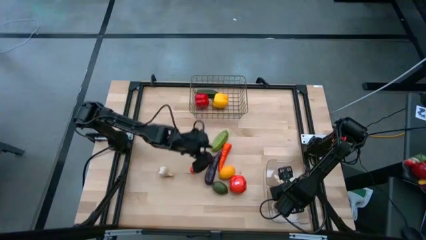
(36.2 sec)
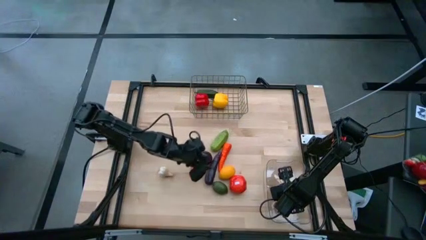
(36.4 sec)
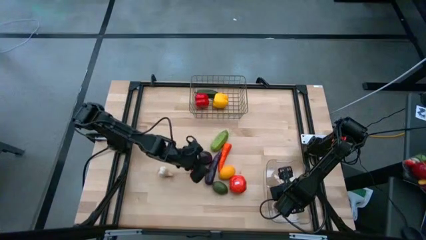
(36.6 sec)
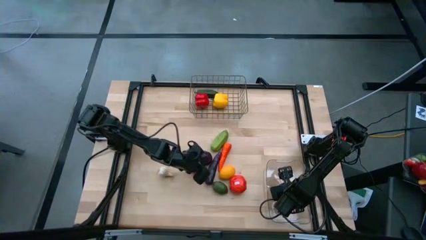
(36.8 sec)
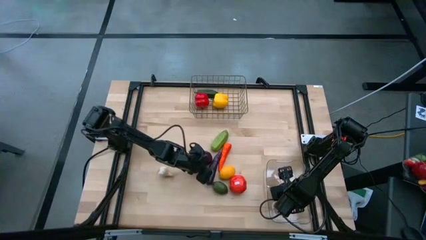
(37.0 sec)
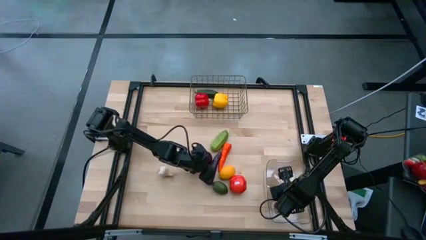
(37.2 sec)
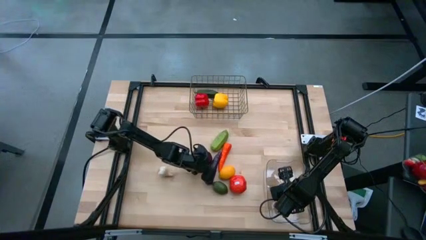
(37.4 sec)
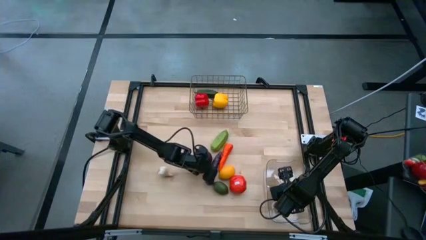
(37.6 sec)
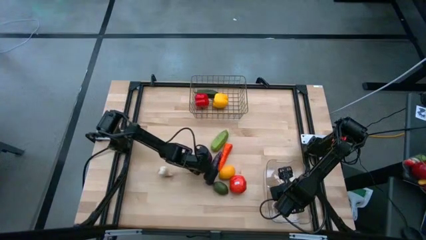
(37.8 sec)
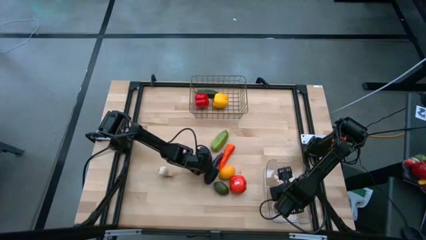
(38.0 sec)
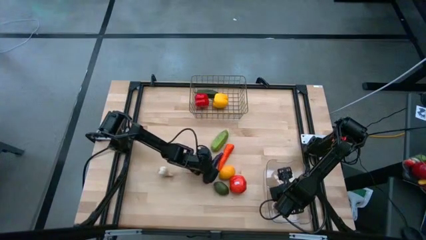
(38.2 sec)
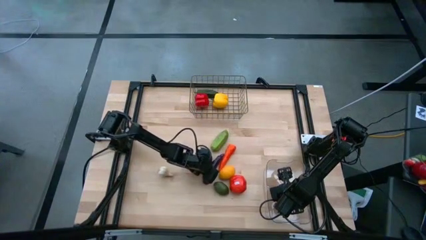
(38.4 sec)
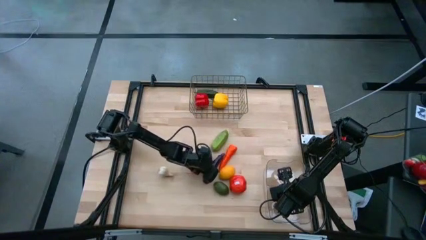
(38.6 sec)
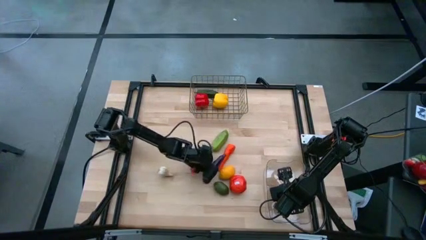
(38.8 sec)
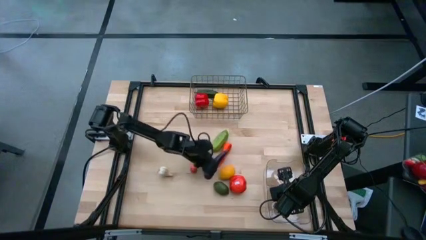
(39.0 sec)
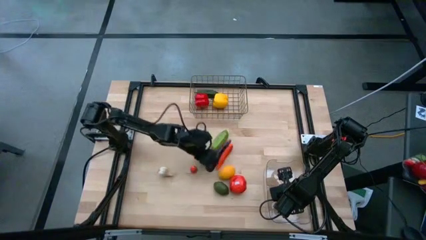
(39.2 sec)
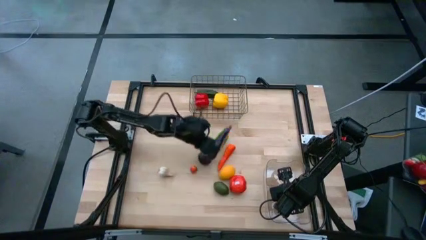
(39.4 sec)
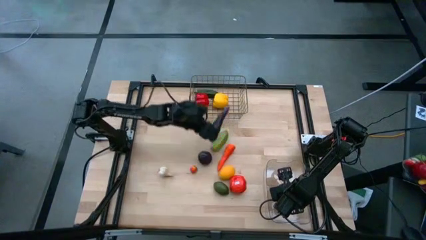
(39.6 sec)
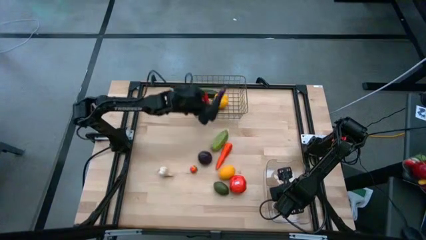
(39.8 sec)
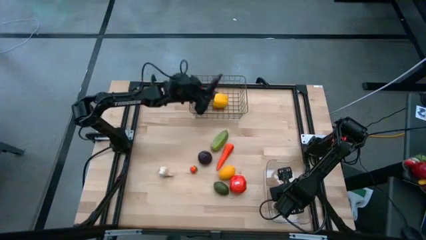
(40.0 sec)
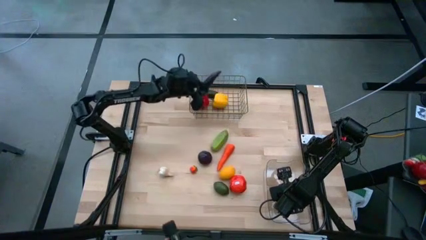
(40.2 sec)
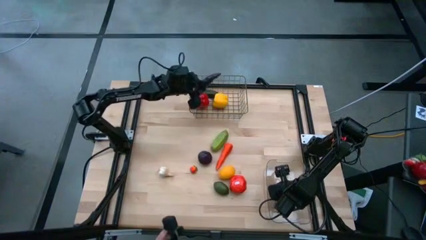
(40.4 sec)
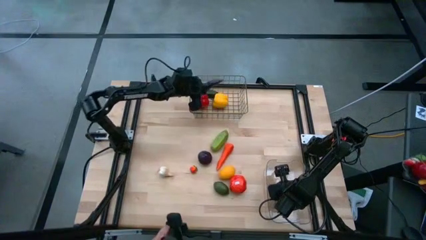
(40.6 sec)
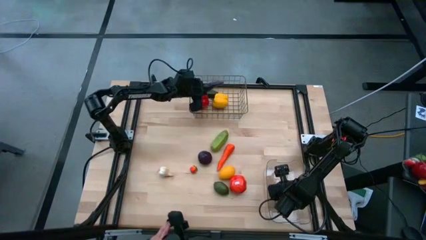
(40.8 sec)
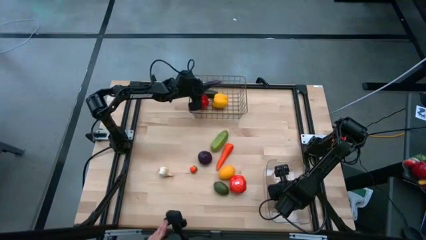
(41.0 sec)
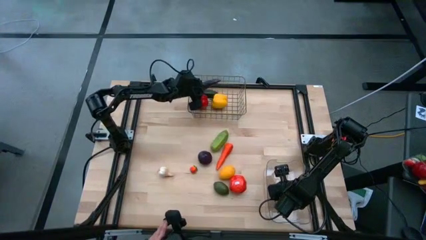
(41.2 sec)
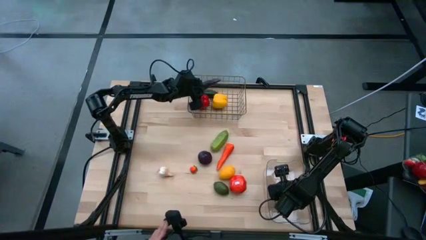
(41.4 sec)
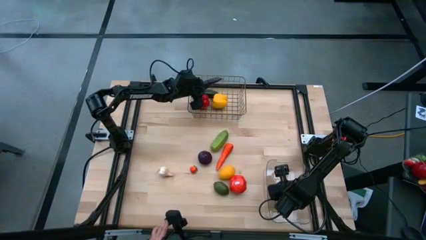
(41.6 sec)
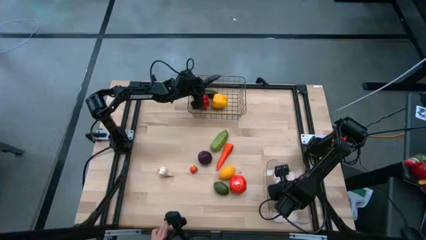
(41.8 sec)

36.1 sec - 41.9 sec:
Task: Sort produce into baskets
Put the purple eggplant into the wire basket

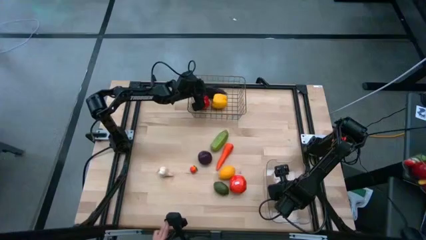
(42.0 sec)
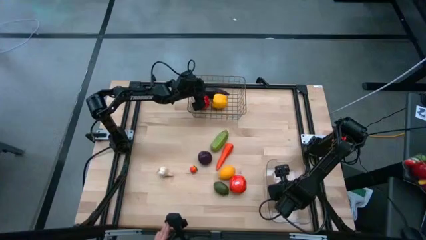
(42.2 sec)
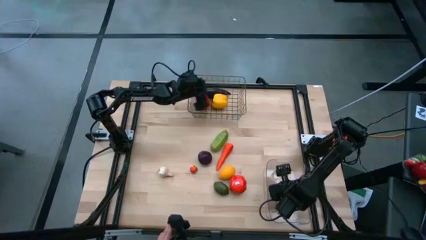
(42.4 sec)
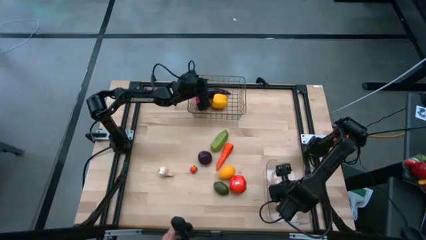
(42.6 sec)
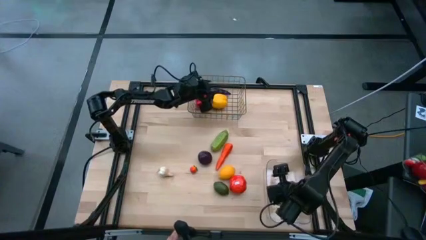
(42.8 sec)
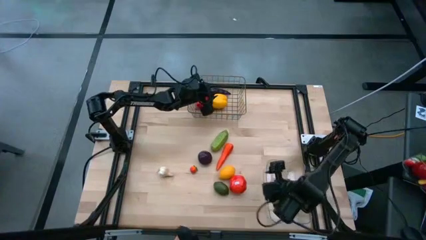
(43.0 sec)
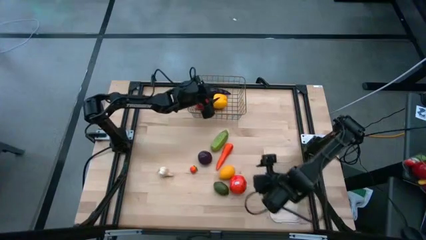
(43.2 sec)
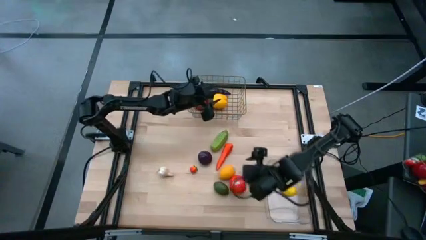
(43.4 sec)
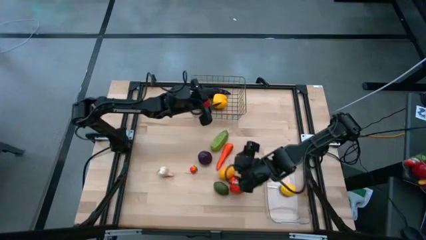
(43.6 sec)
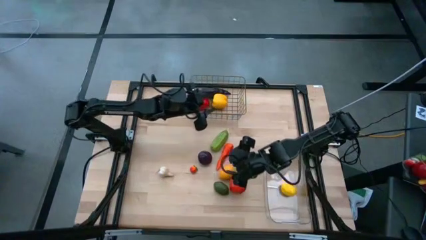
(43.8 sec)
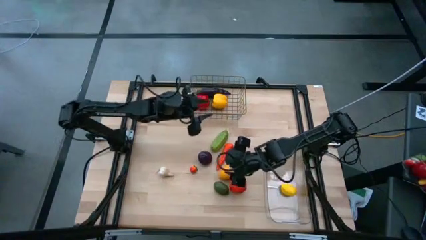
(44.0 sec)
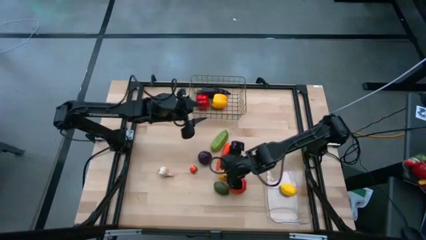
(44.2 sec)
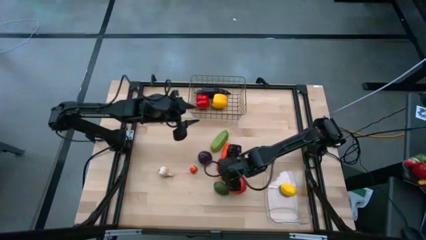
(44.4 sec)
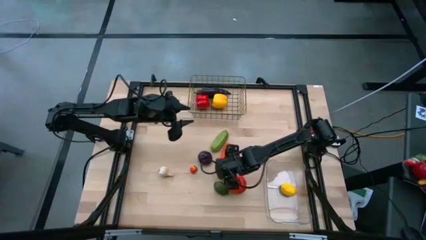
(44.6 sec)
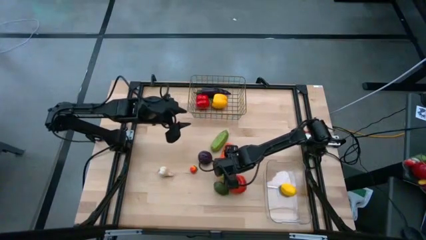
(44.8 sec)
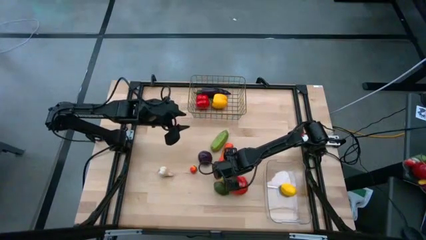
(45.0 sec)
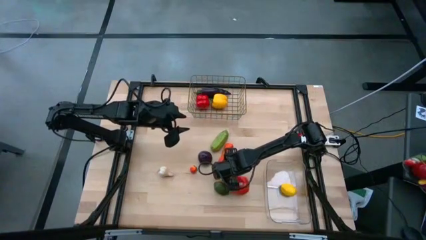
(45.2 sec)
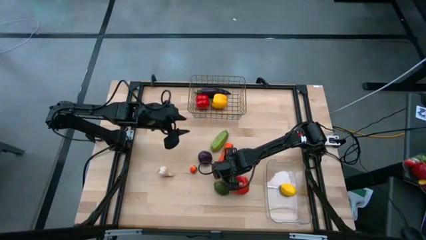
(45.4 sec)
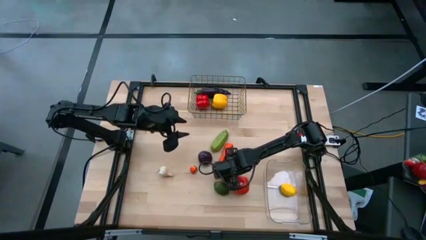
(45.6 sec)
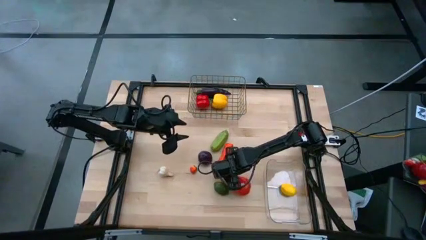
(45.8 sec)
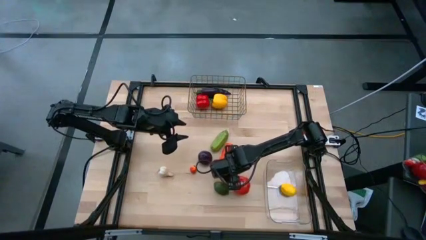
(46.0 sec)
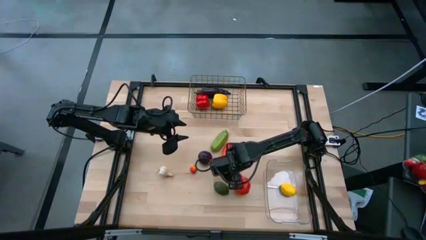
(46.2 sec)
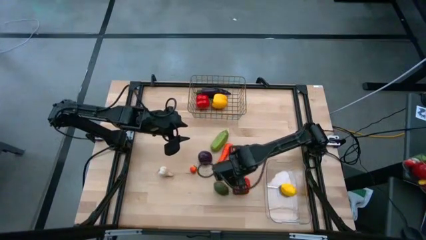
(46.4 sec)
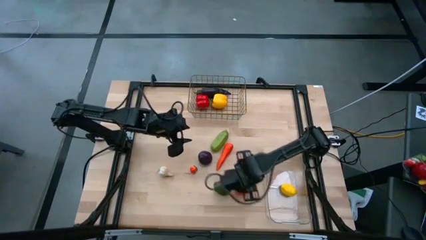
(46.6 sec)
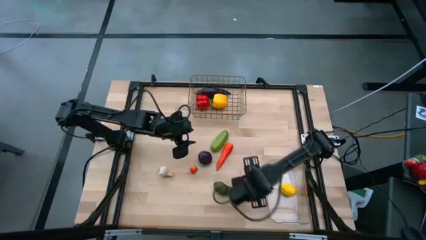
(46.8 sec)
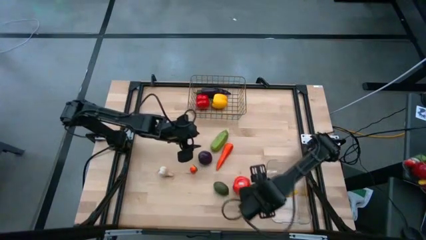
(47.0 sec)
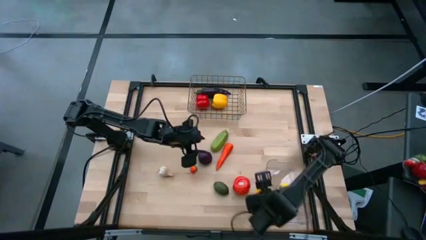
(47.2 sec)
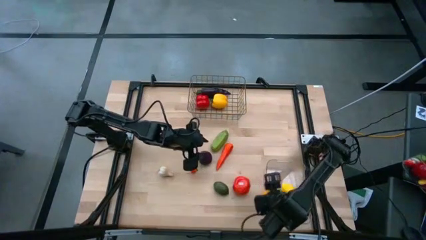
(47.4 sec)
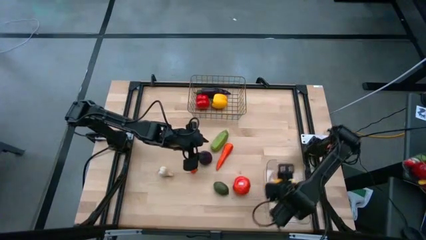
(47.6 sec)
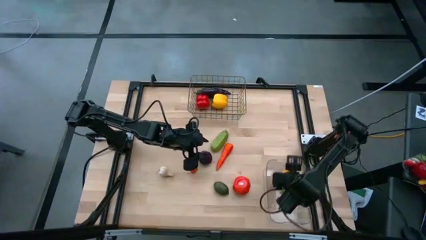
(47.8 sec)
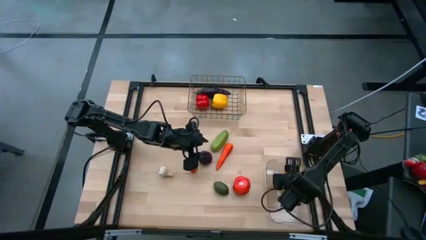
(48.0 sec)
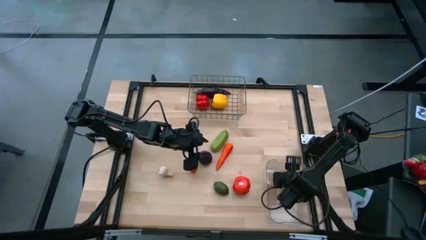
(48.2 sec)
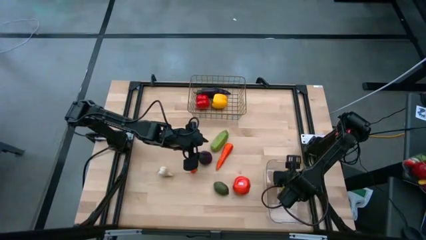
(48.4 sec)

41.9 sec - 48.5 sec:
Put the yellow lemon into the transparent bin

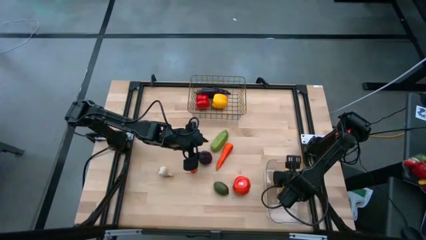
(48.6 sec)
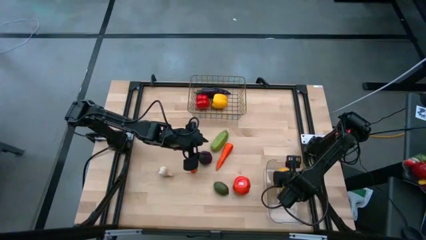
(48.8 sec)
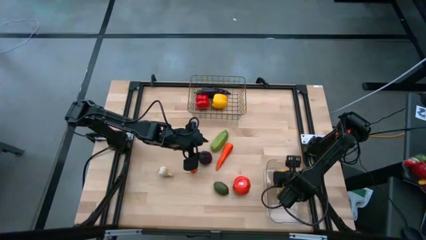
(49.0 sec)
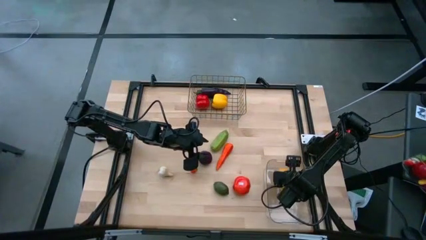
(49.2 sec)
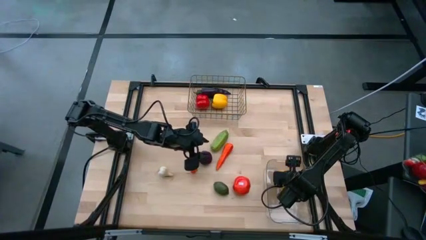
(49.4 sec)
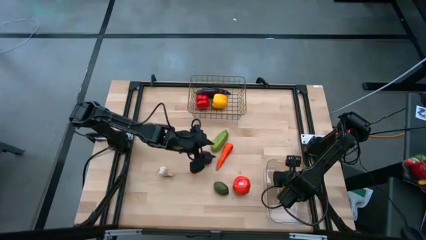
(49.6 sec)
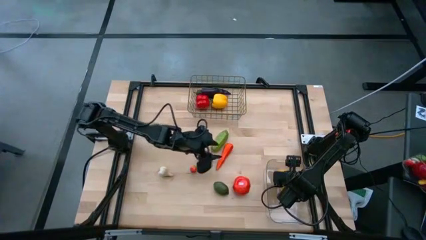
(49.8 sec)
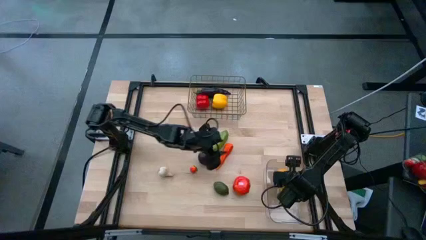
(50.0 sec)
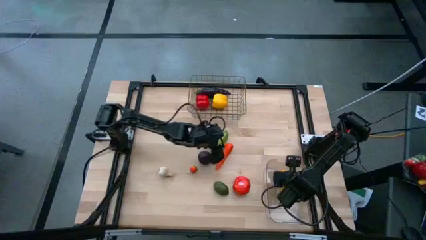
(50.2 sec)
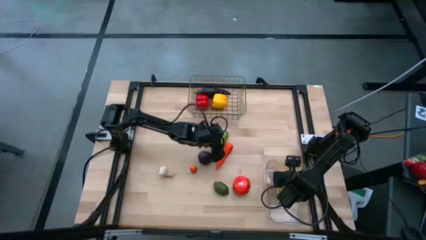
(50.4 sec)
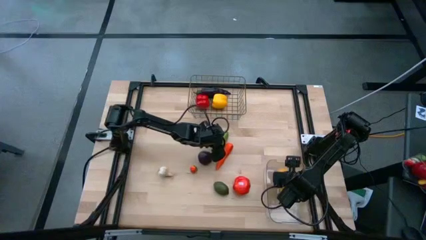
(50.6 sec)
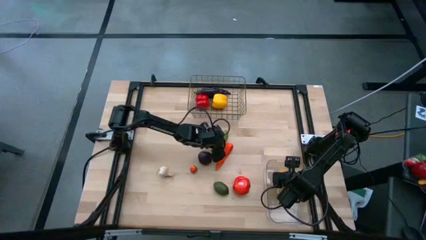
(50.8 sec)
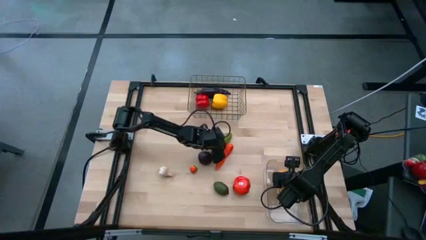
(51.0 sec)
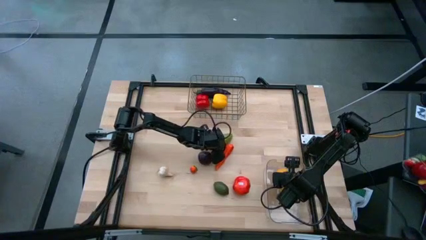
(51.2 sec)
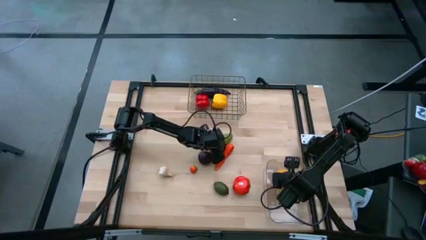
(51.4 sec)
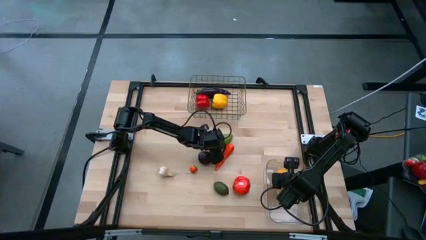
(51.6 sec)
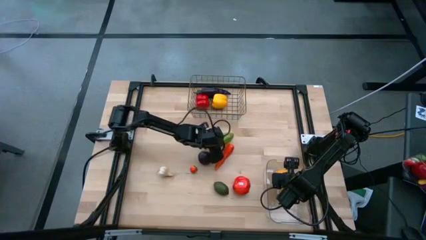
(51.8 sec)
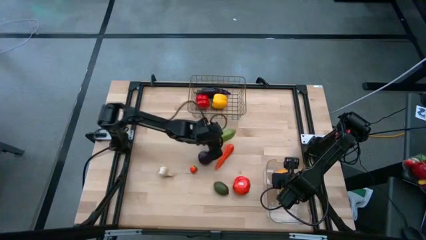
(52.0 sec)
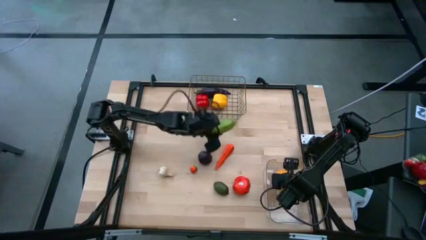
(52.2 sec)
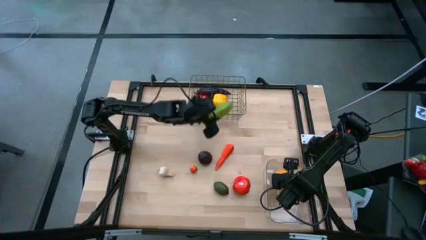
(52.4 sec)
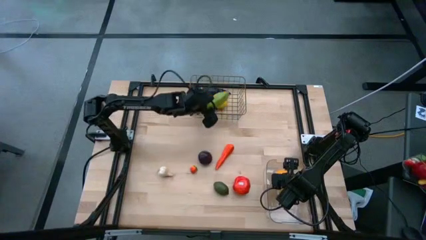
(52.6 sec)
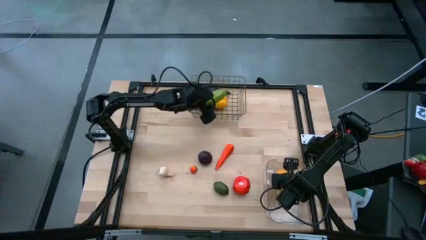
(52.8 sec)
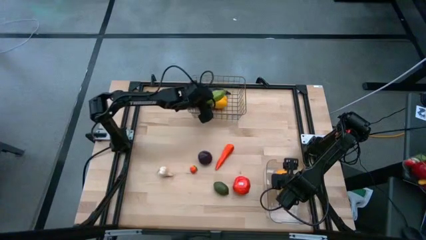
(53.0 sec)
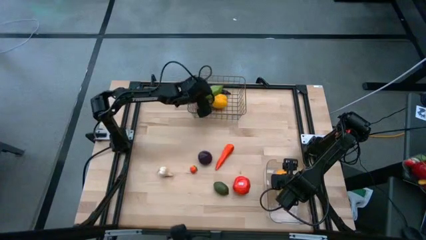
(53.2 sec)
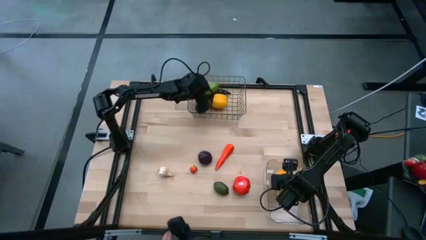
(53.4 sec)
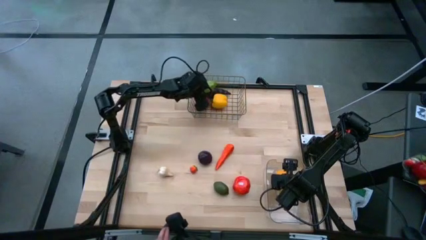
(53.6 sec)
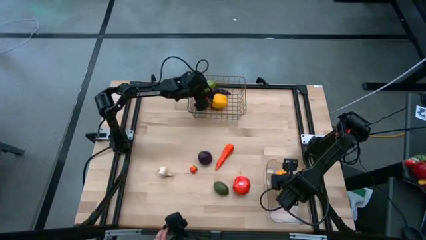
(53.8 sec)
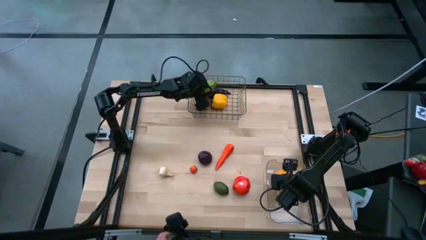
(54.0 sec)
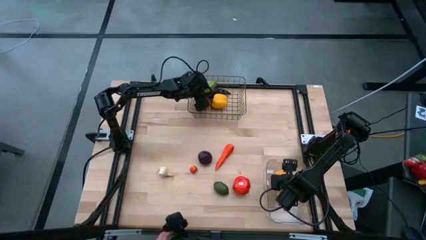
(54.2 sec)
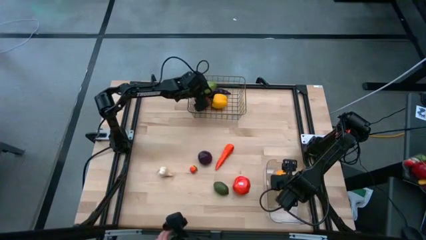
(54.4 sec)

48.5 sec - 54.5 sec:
Put the green chayote into the wire basket
